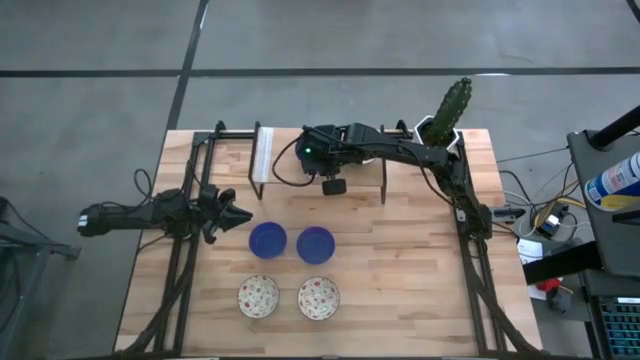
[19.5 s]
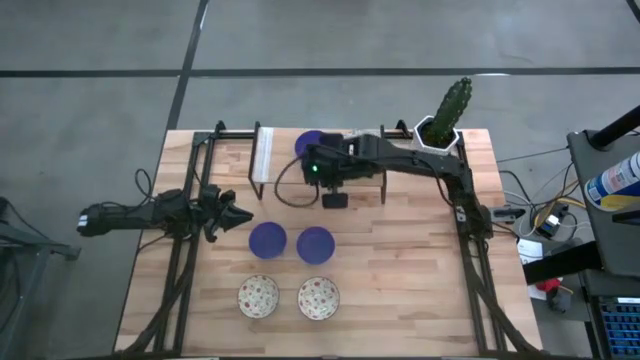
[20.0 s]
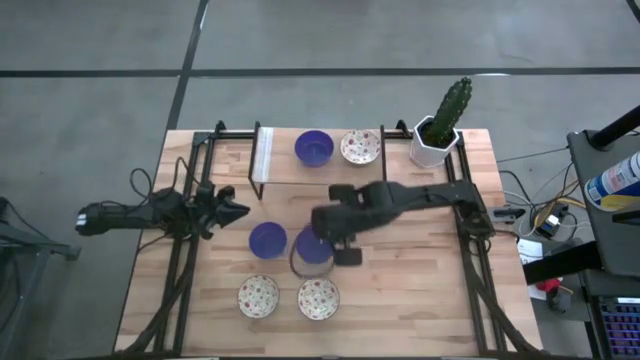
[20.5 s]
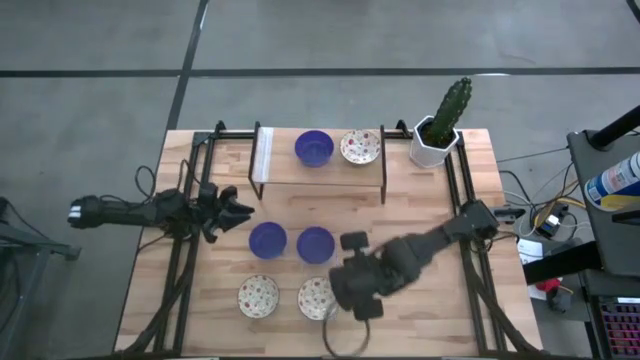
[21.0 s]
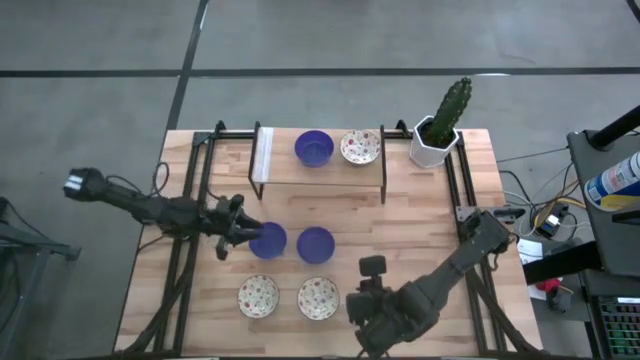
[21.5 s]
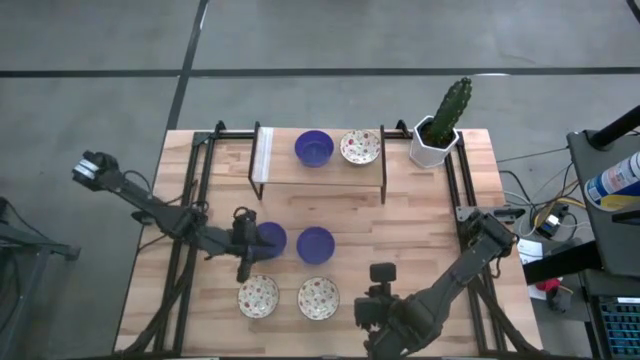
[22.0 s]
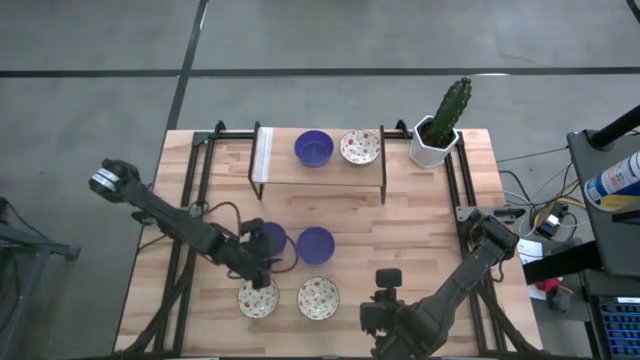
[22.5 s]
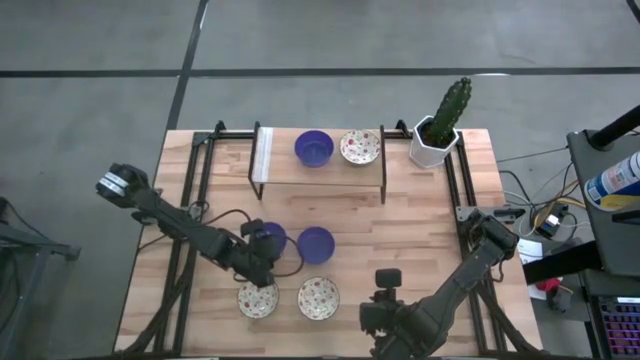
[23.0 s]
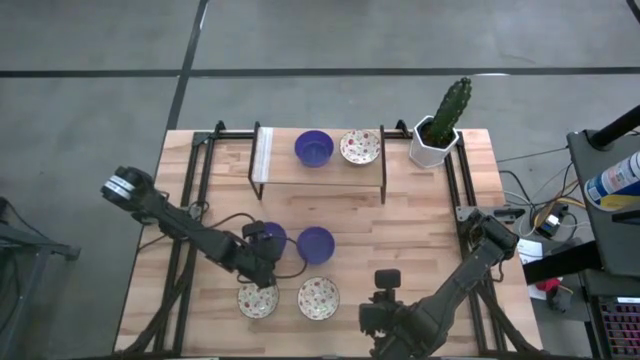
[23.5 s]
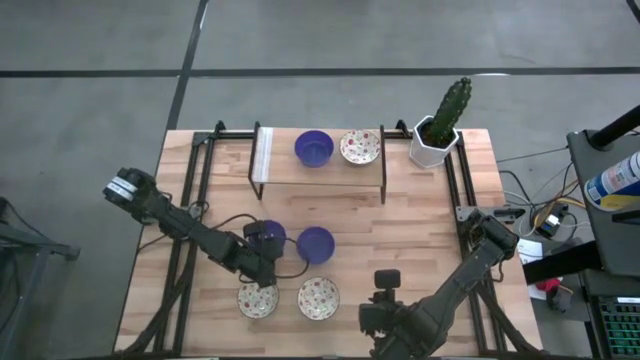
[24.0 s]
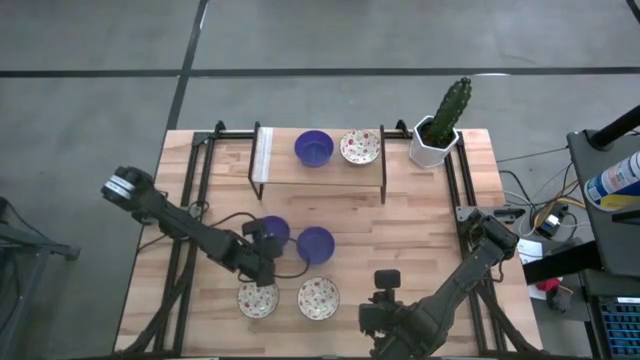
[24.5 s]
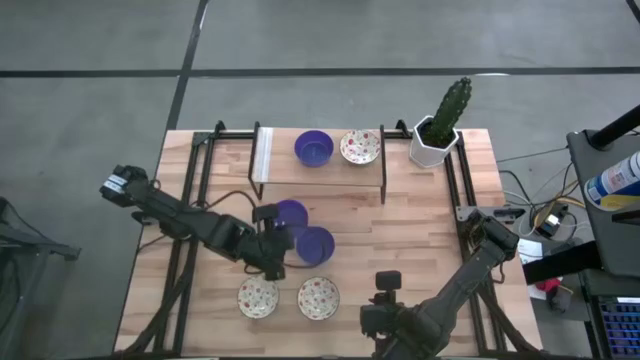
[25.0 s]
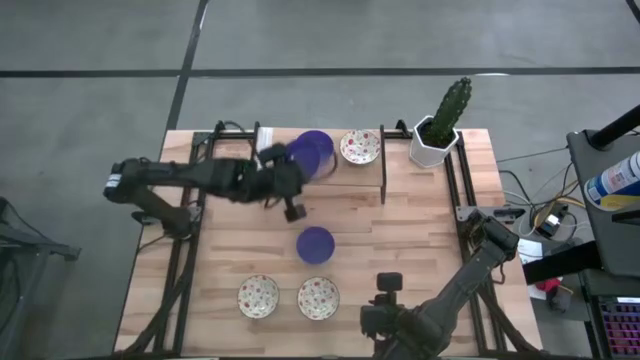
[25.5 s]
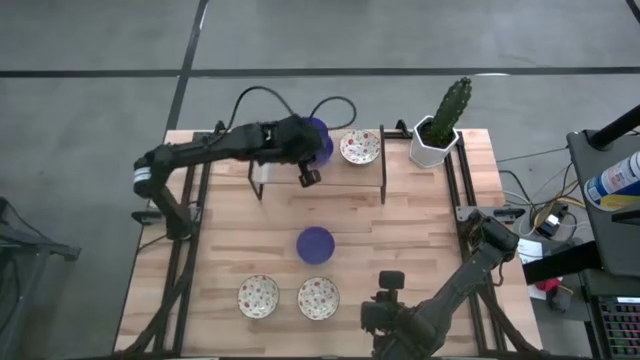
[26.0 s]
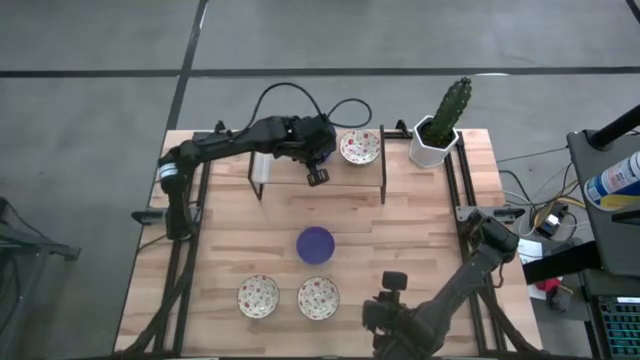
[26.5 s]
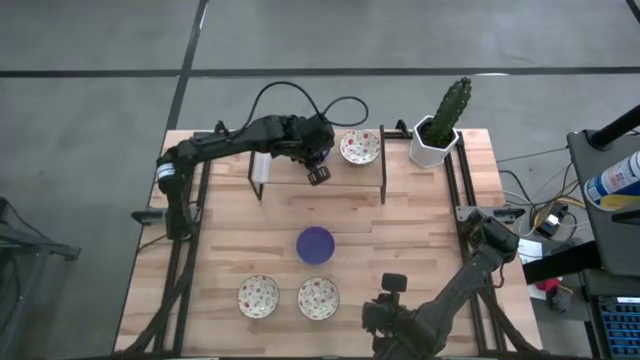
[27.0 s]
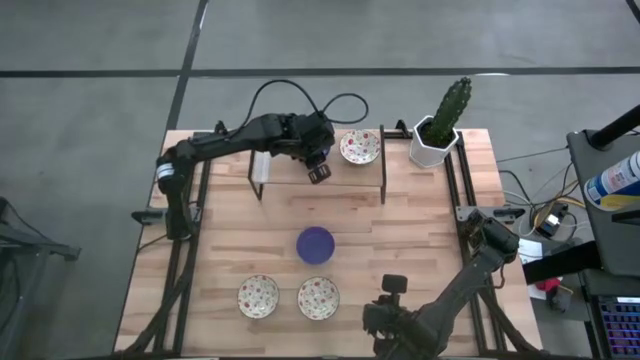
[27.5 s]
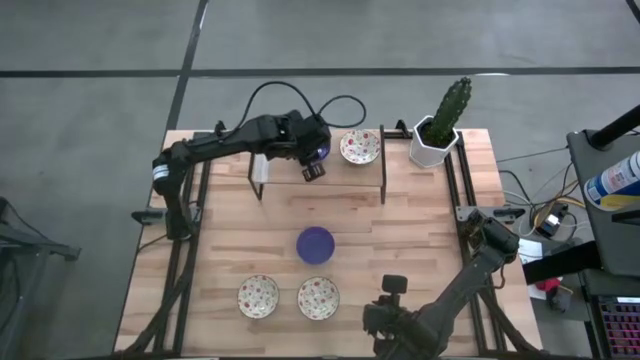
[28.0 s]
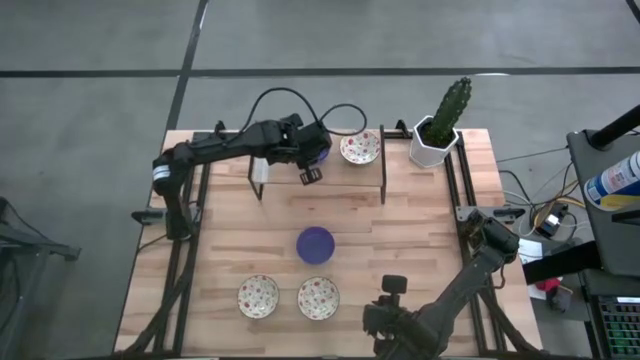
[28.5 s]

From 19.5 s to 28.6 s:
Task: Pick & Place Mini bowls
Stack the left blue bowl on the blue bowl on the shelf

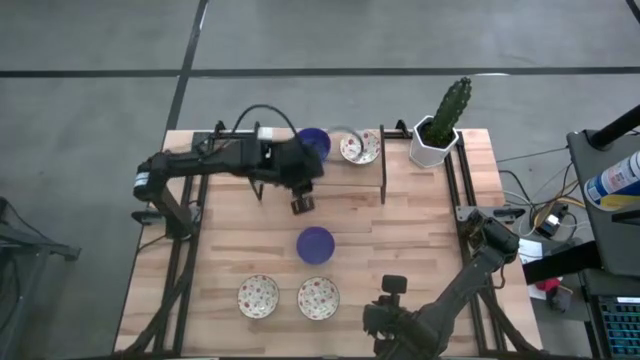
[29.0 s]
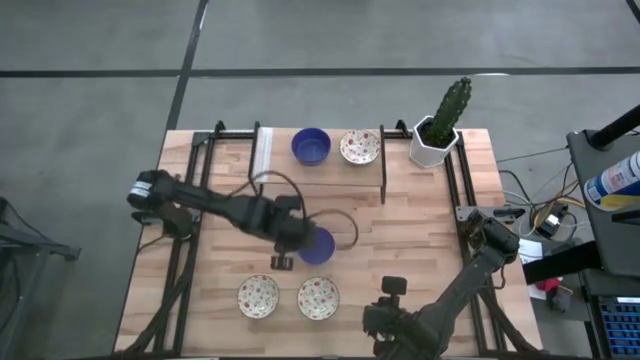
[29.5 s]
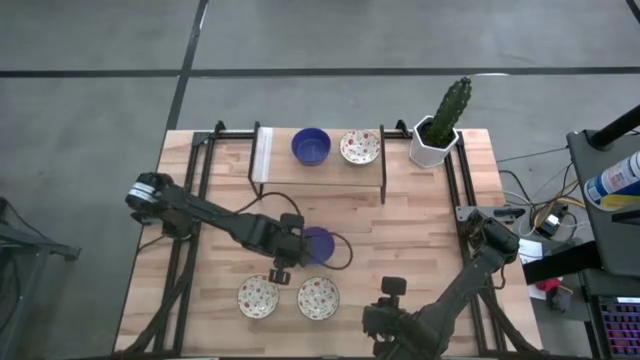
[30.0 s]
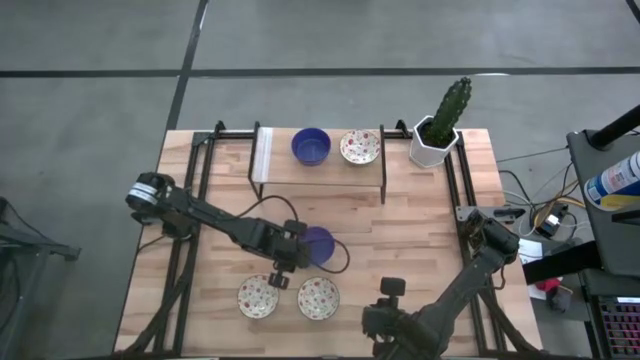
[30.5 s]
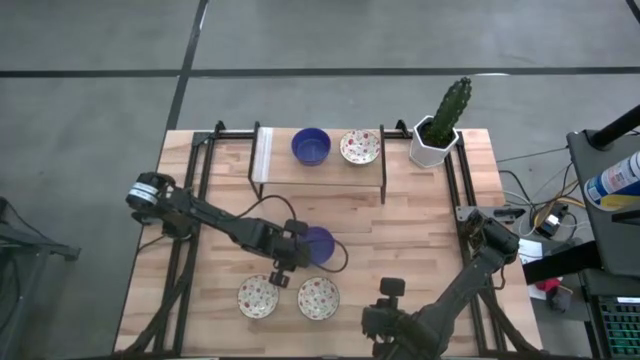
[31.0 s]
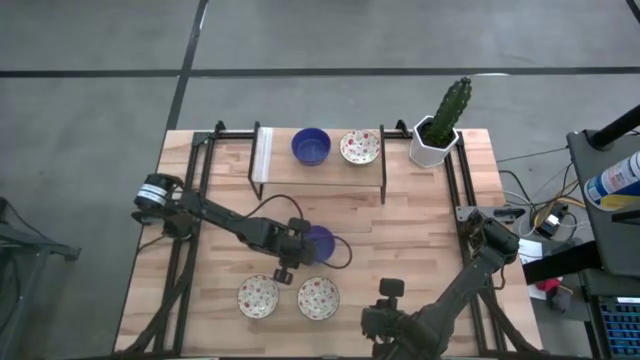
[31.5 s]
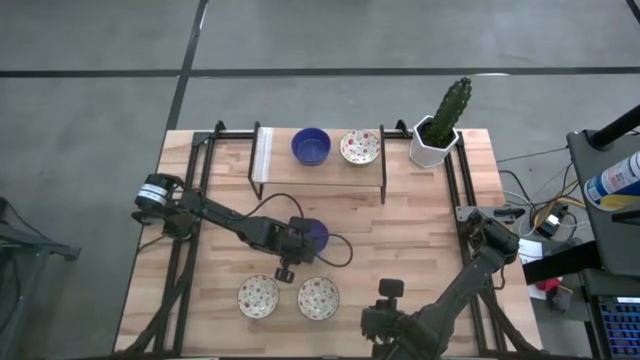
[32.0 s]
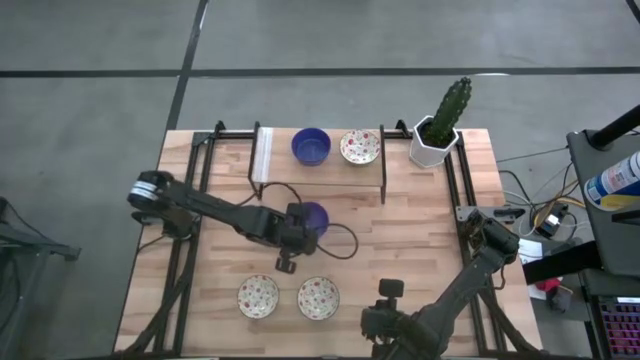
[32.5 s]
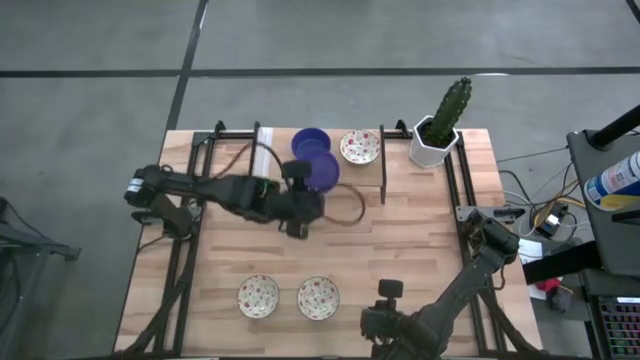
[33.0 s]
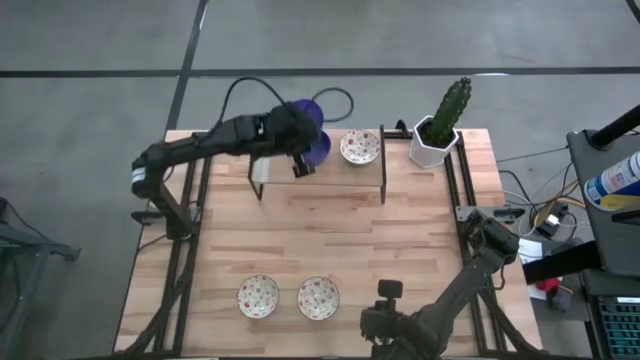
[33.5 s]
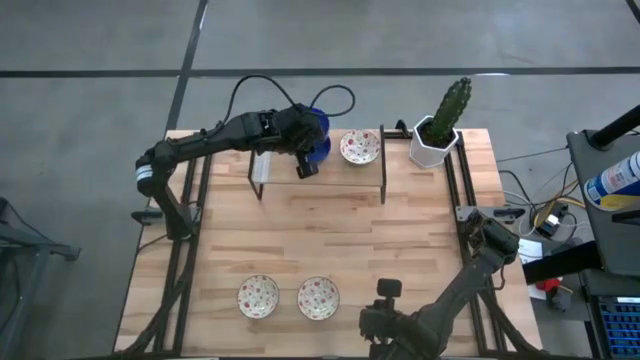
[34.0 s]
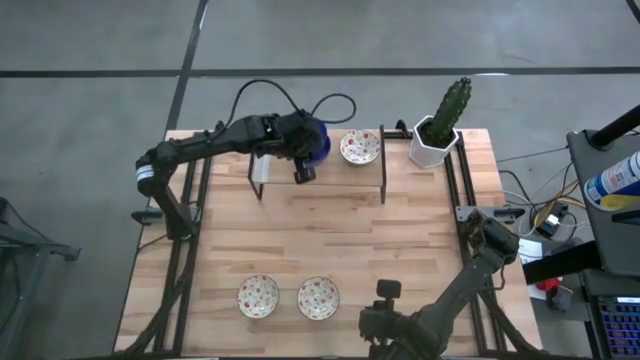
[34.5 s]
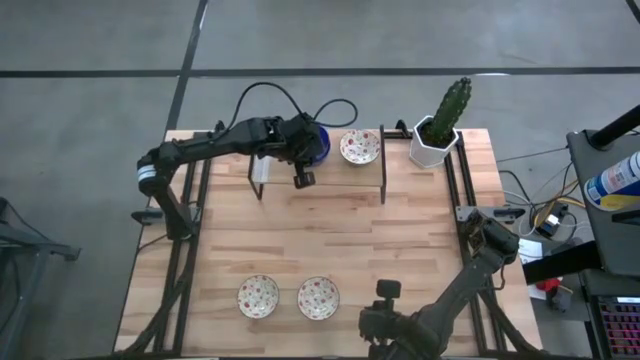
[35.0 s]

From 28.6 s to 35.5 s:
Stack the blue bowl on the blue bowls on the shelf

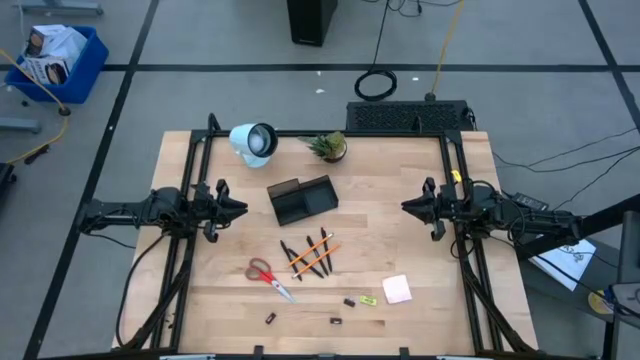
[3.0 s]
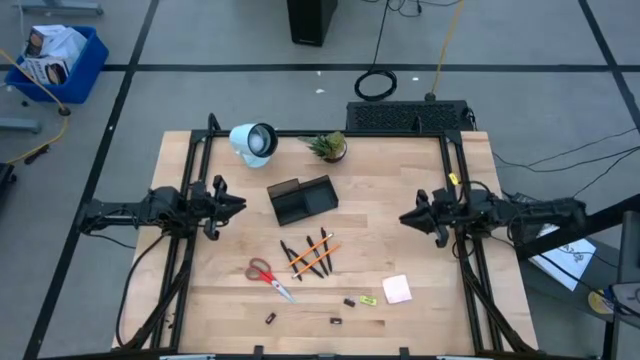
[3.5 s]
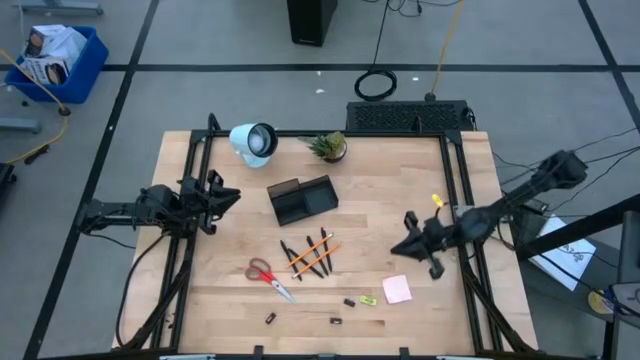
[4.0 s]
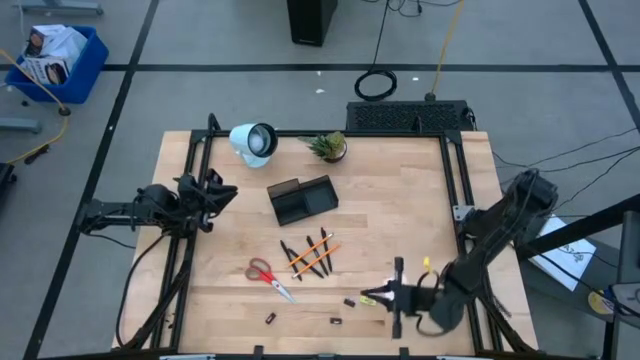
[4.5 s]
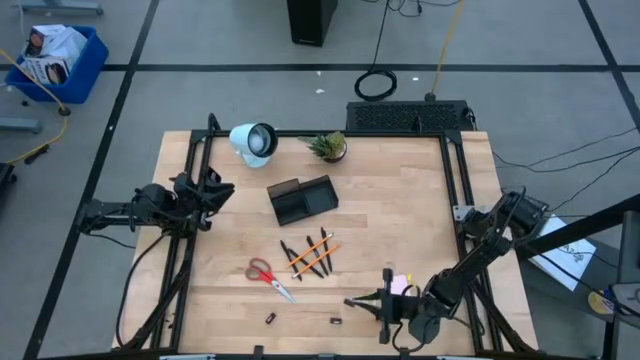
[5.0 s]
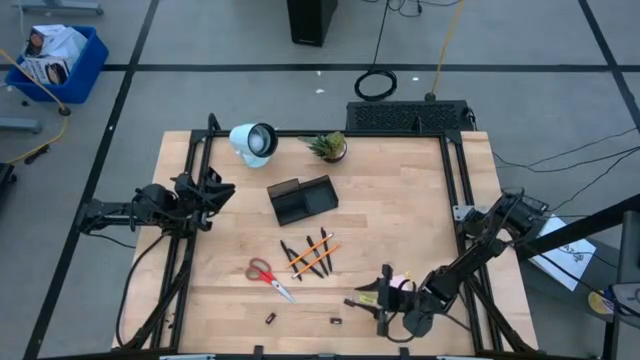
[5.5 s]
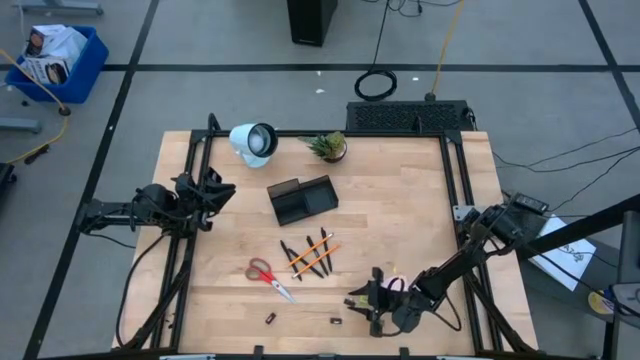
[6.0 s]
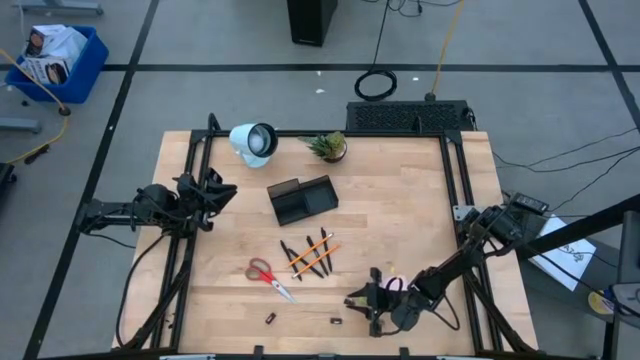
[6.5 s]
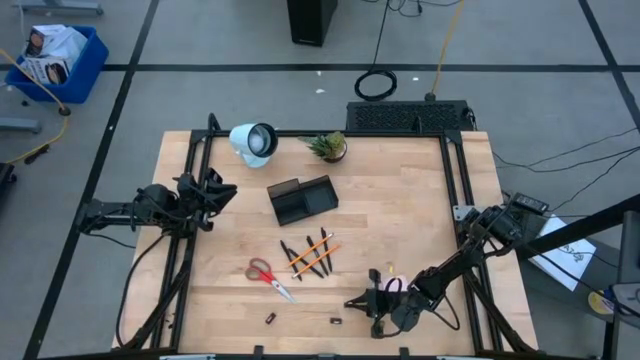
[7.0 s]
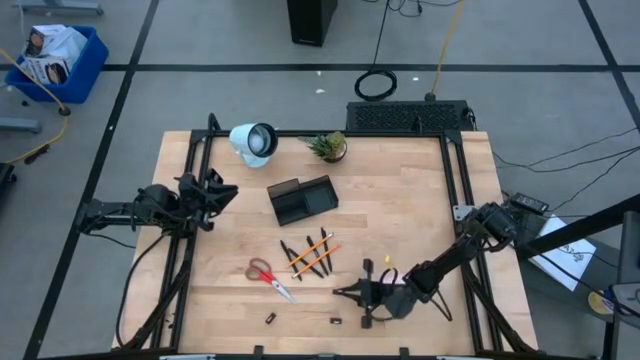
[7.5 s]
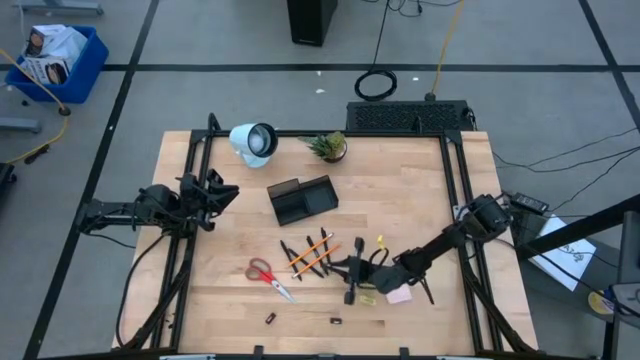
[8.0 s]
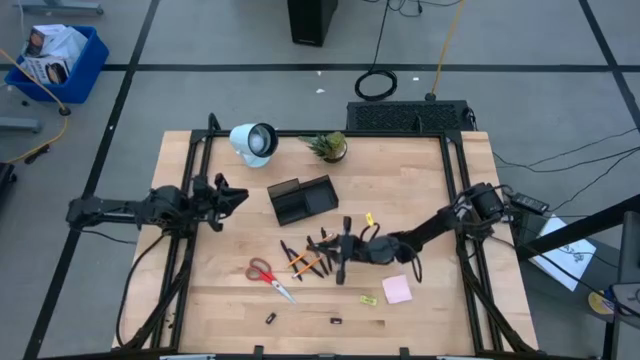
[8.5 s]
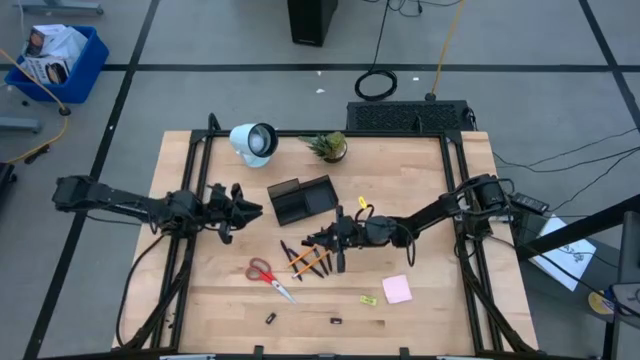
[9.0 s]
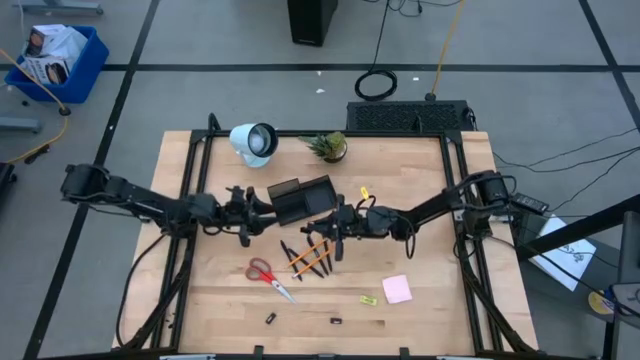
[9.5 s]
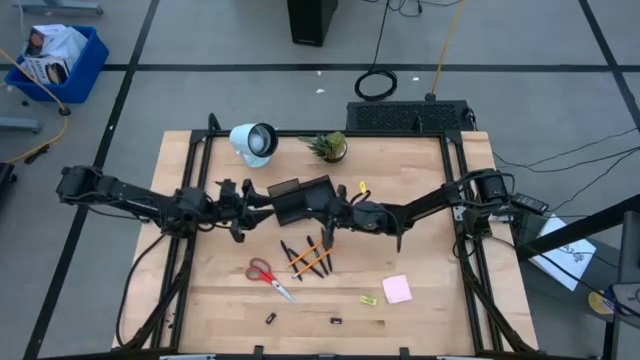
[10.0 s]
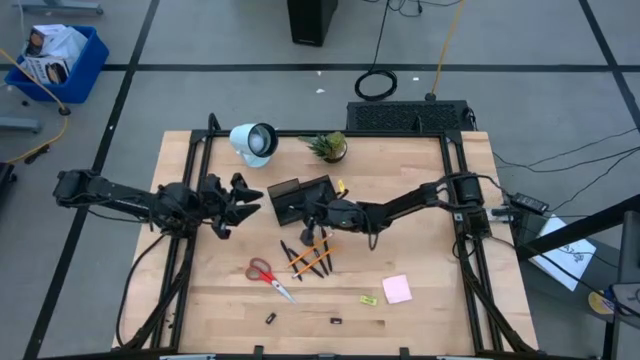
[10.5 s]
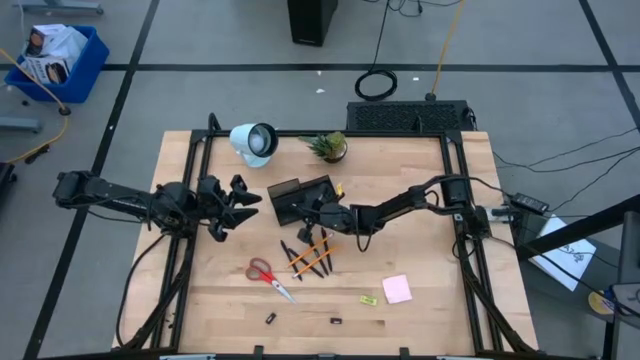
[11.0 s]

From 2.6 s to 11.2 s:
Task: Pick and place office supplies into organizer
Put the black binder clip into the black desk organizer
